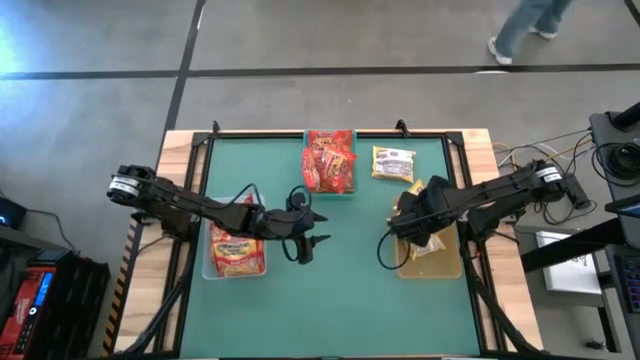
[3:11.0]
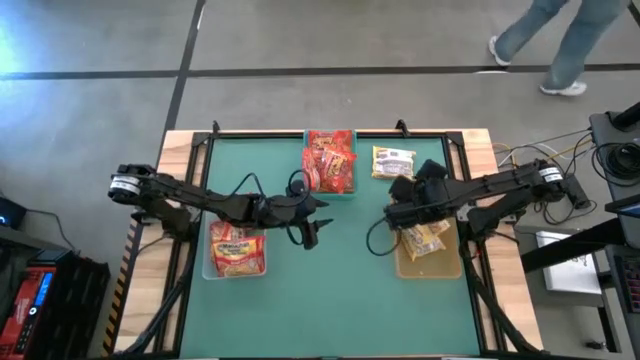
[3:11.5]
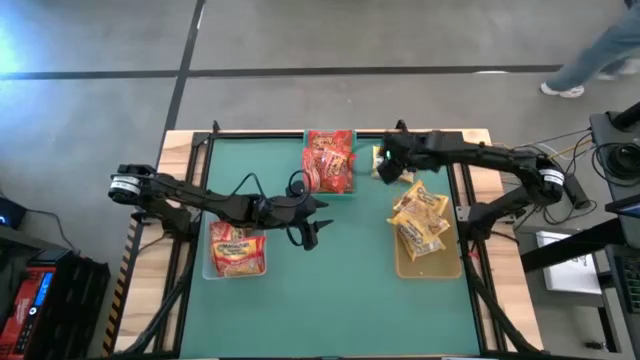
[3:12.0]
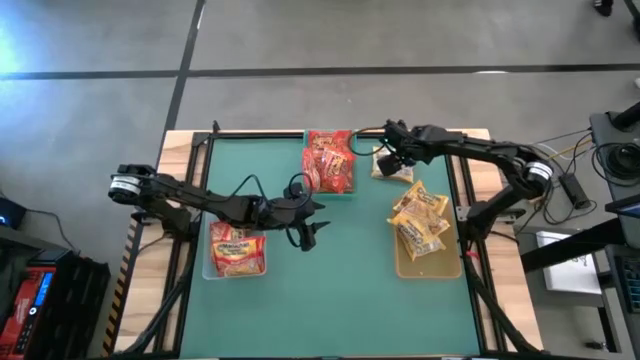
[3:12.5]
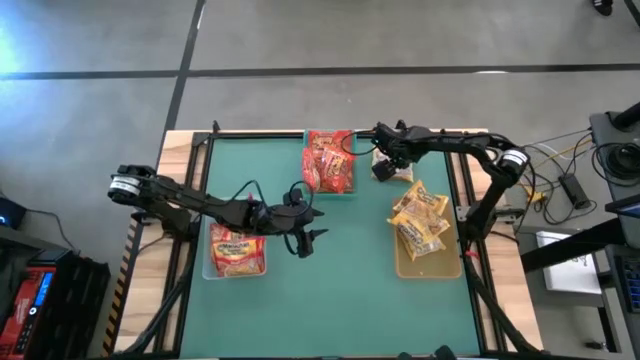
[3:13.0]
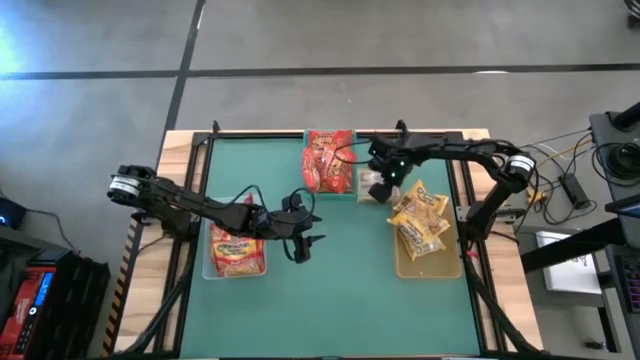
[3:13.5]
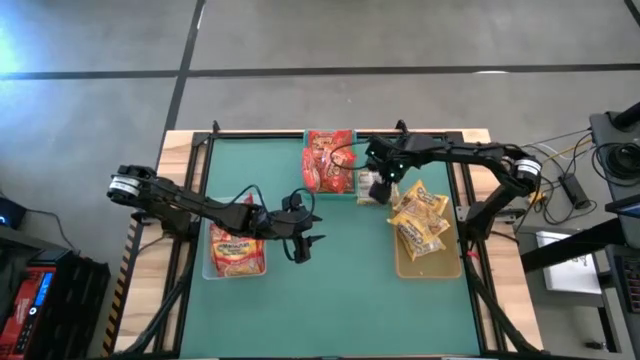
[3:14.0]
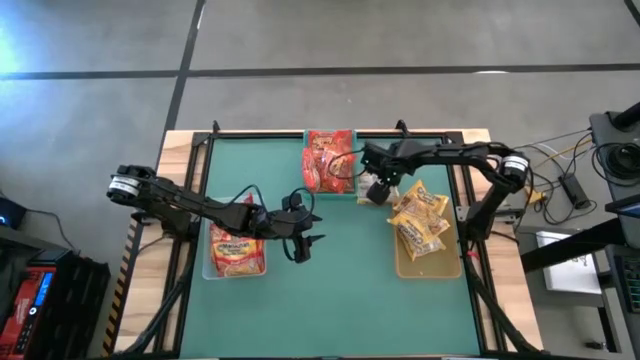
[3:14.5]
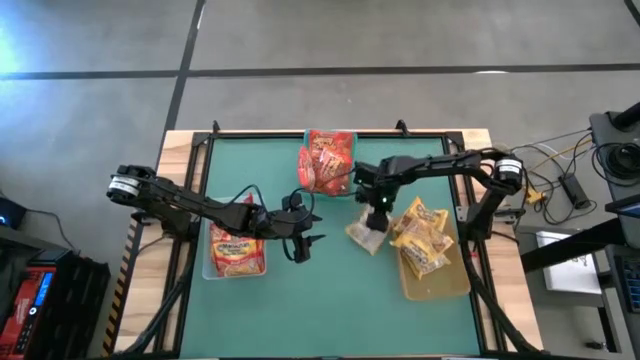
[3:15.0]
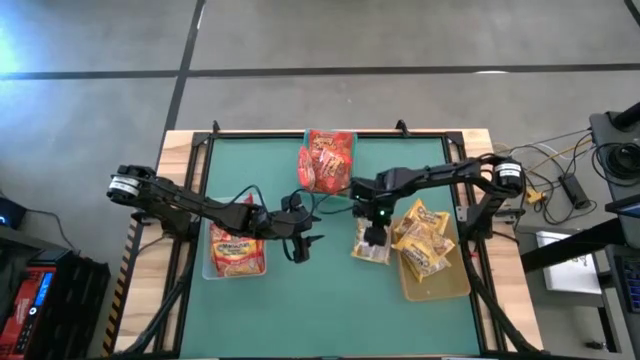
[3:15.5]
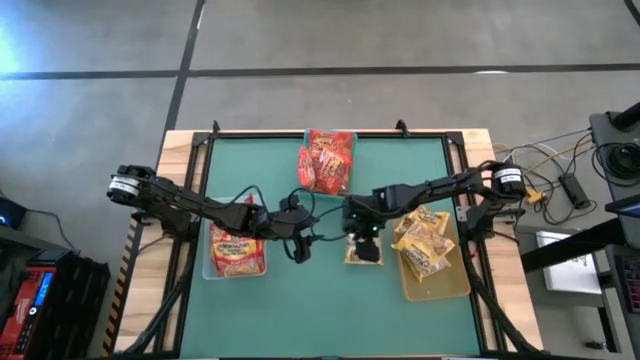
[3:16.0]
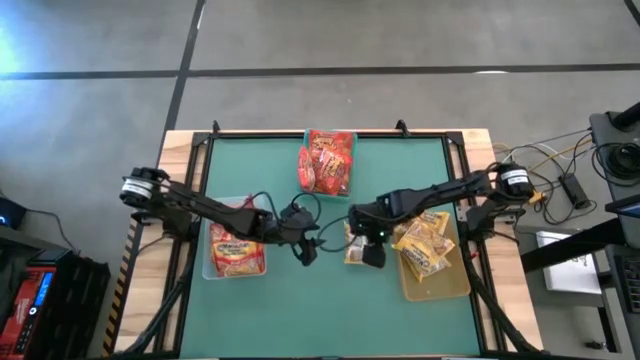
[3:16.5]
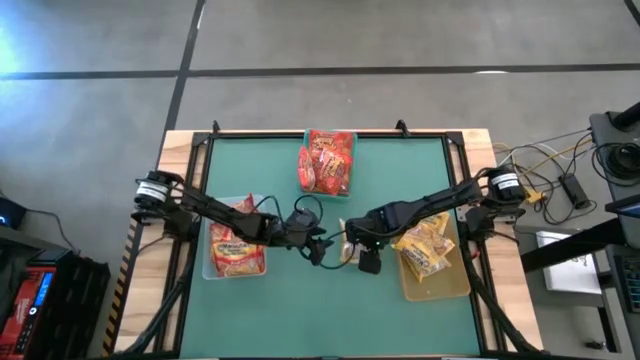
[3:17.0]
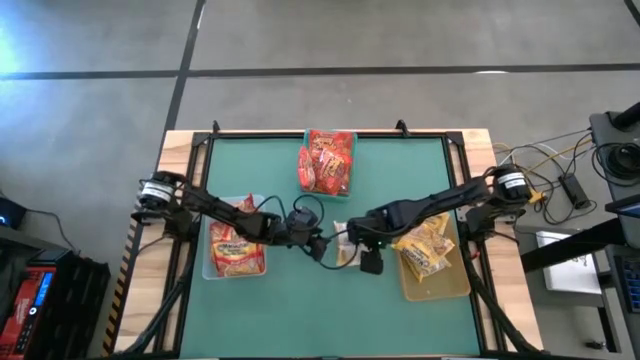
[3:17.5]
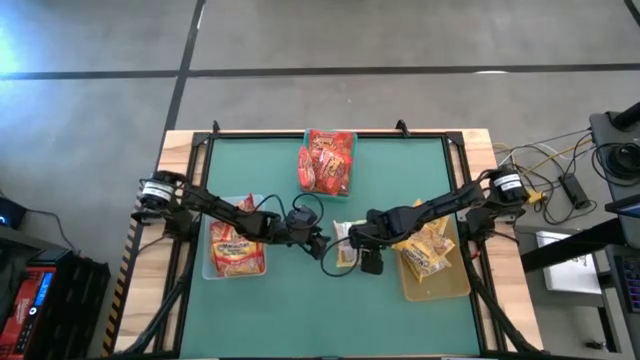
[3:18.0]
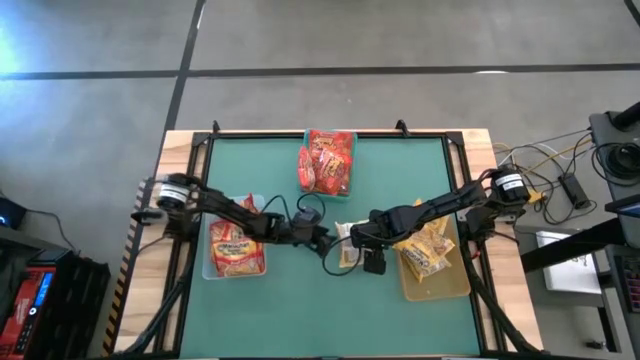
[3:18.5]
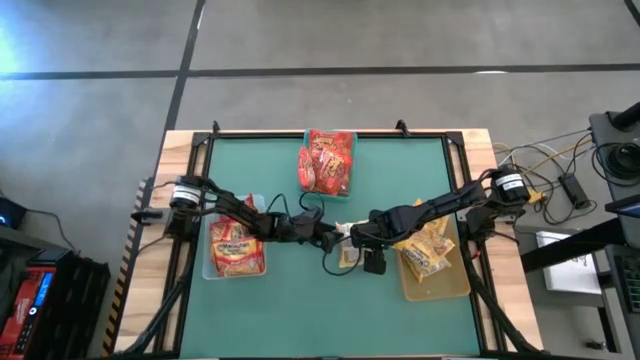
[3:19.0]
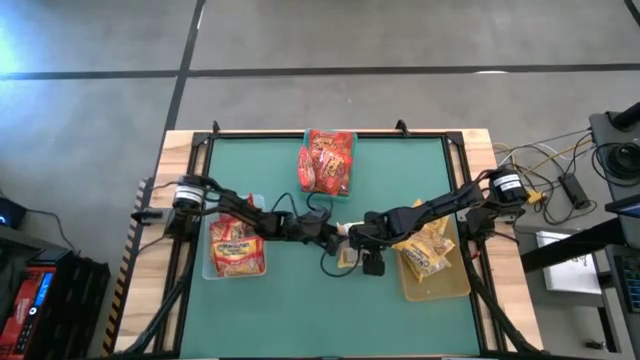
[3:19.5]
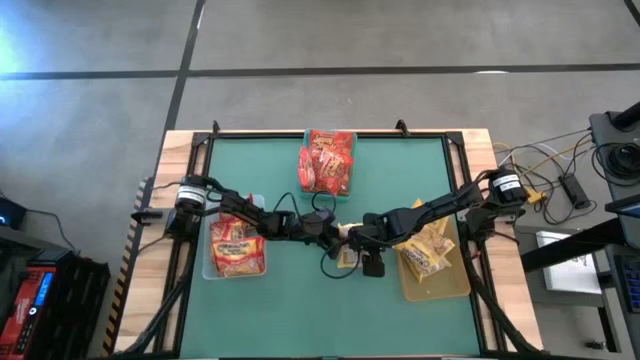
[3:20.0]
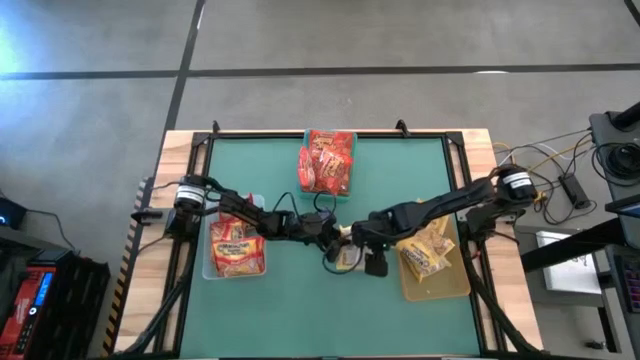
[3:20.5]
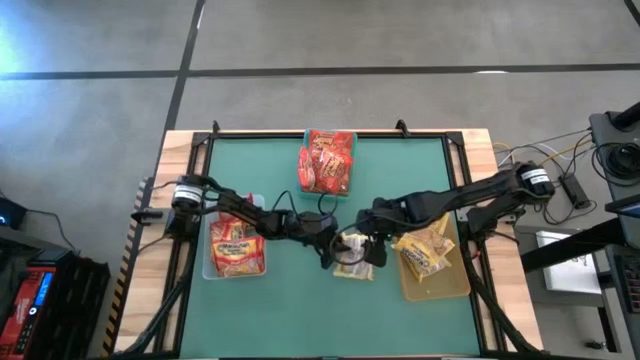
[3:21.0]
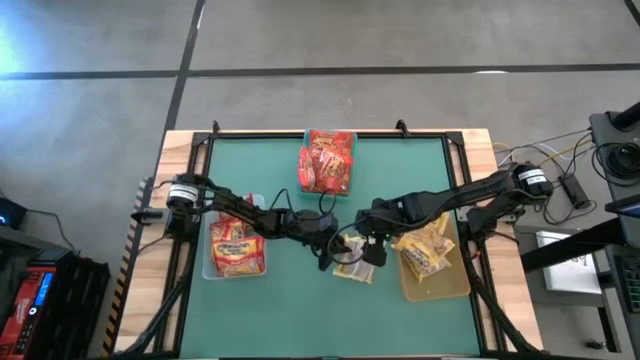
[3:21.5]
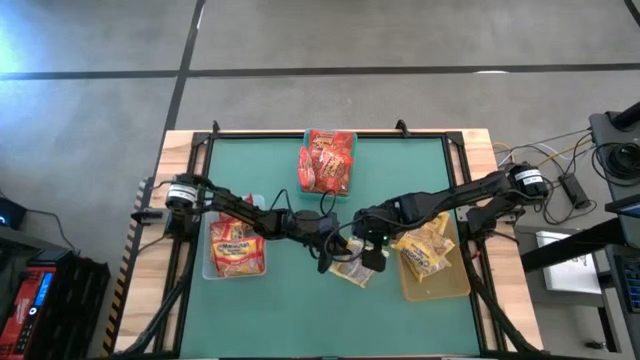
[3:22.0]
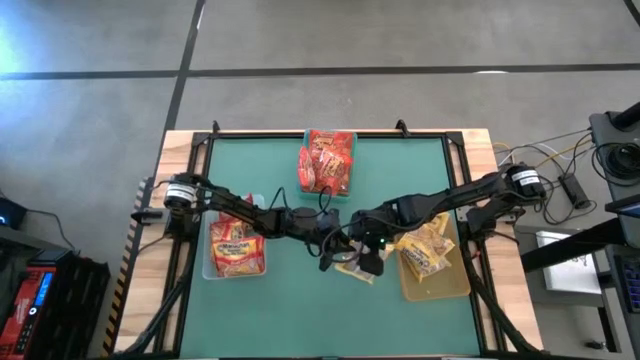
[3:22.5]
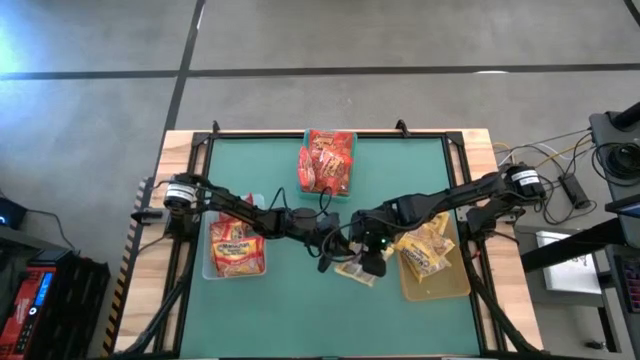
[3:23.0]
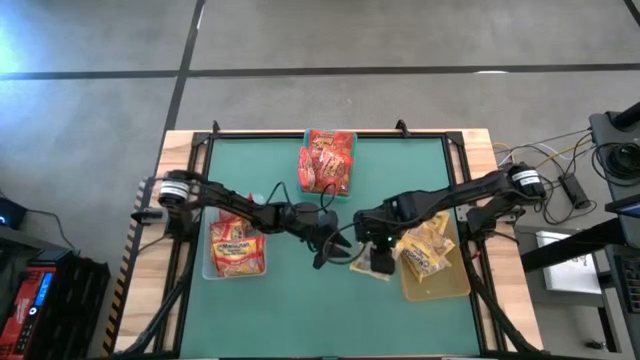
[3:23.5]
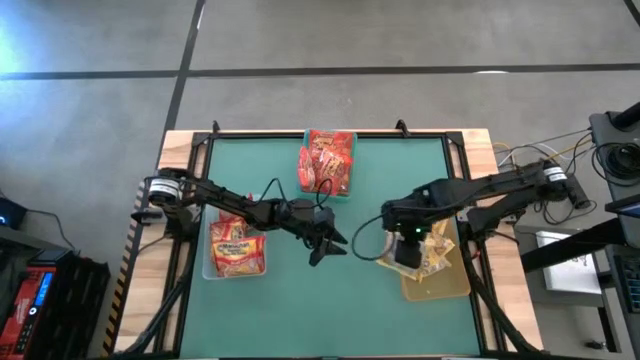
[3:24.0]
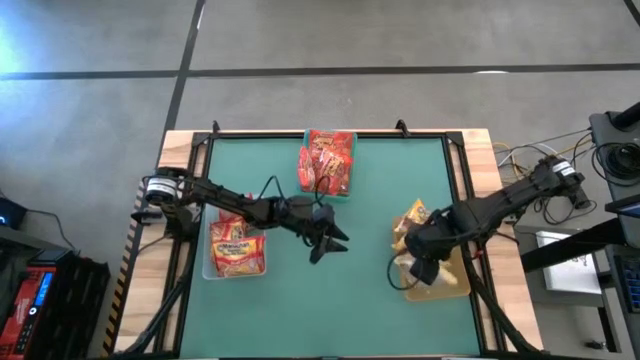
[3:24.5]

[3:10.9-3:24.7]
Task: Sort Maruchan noodles
Put the yellow noodle pack into the yellow bin

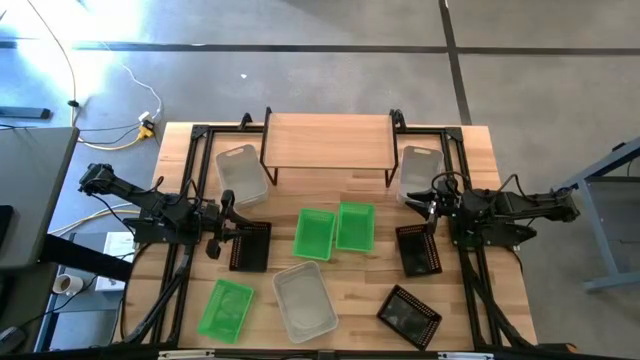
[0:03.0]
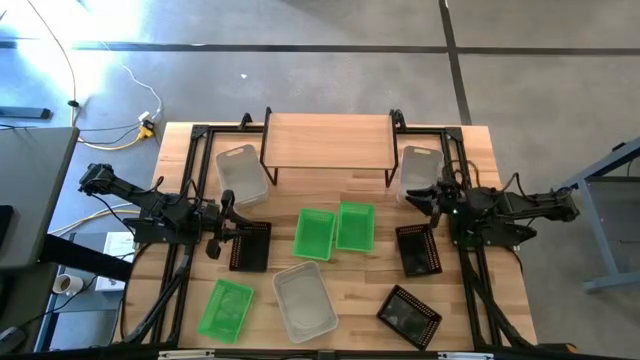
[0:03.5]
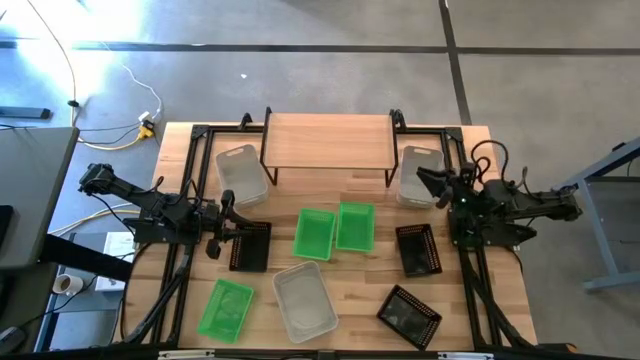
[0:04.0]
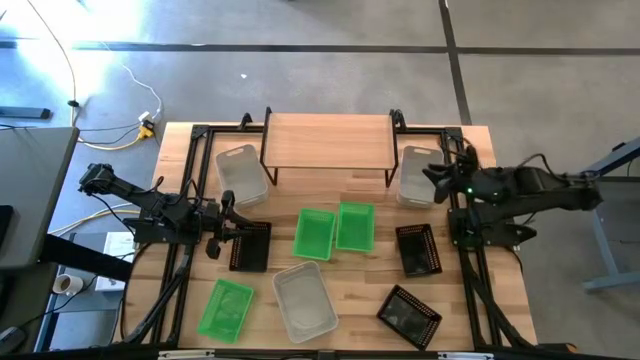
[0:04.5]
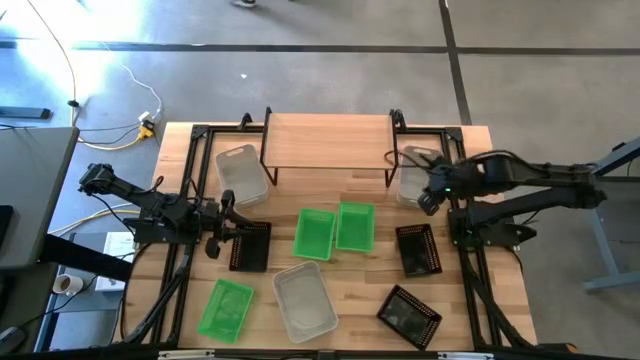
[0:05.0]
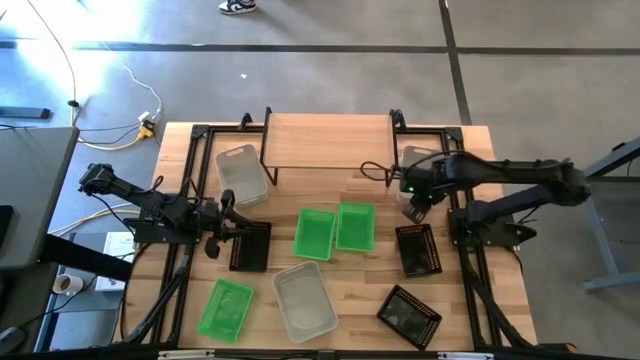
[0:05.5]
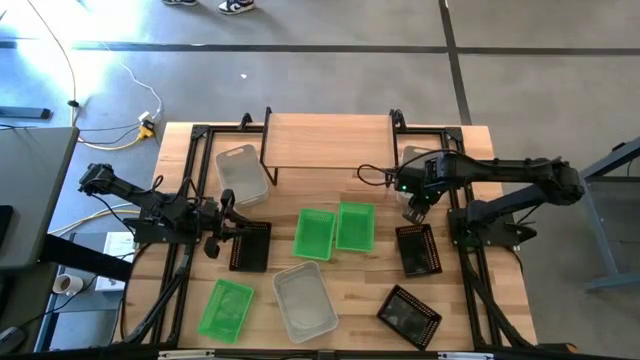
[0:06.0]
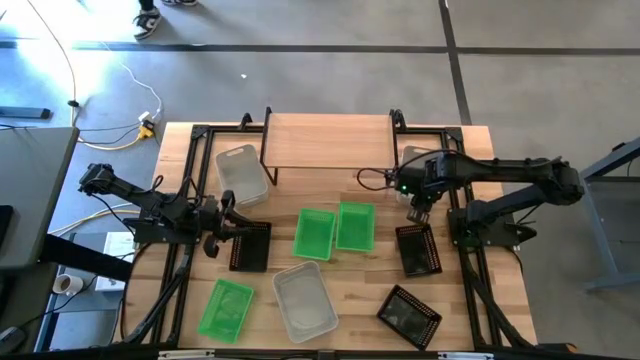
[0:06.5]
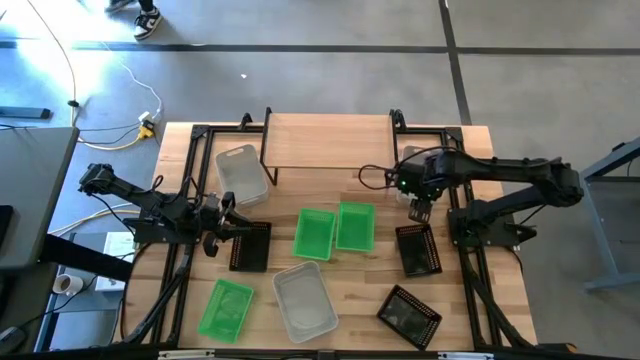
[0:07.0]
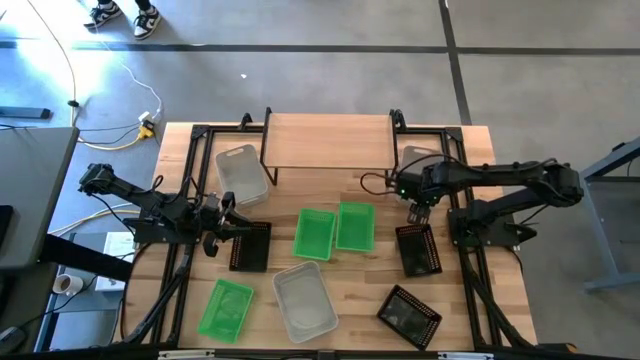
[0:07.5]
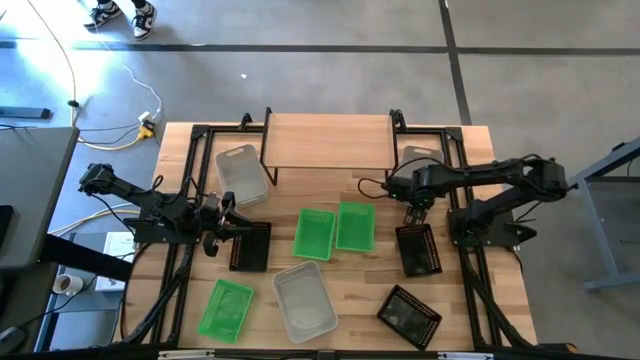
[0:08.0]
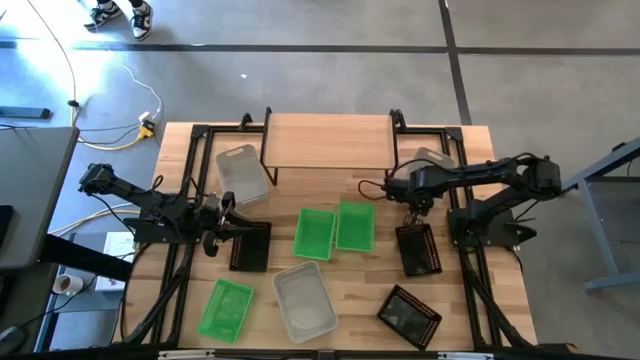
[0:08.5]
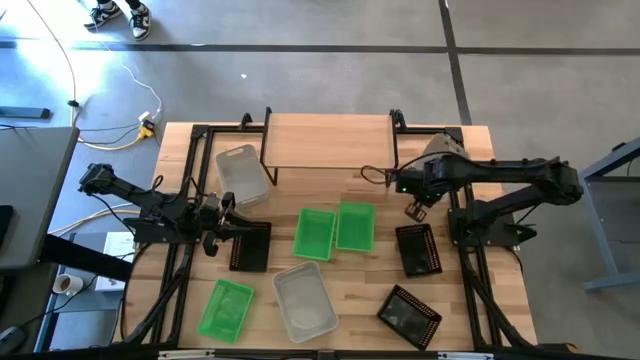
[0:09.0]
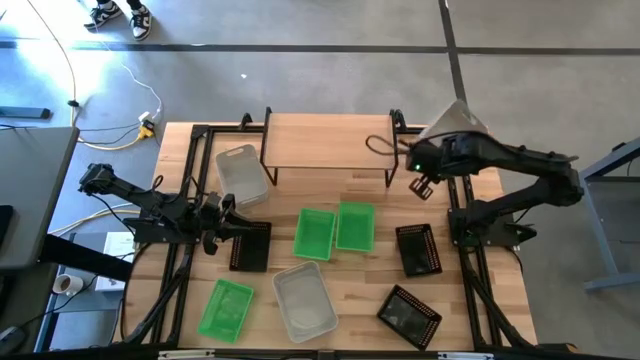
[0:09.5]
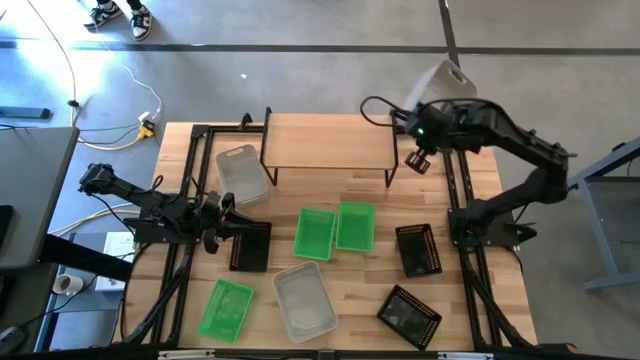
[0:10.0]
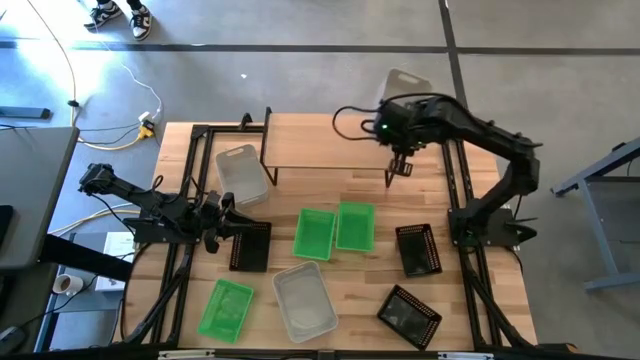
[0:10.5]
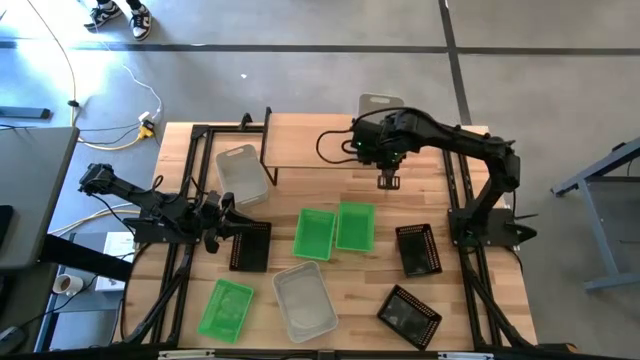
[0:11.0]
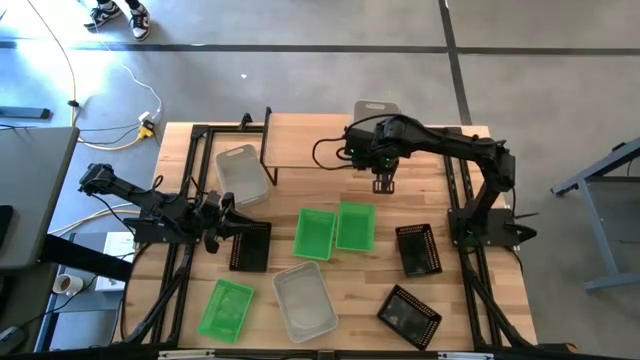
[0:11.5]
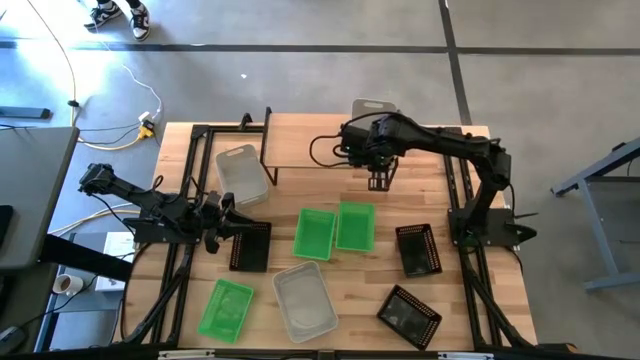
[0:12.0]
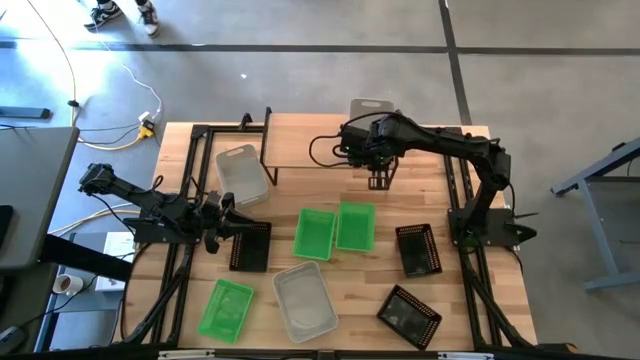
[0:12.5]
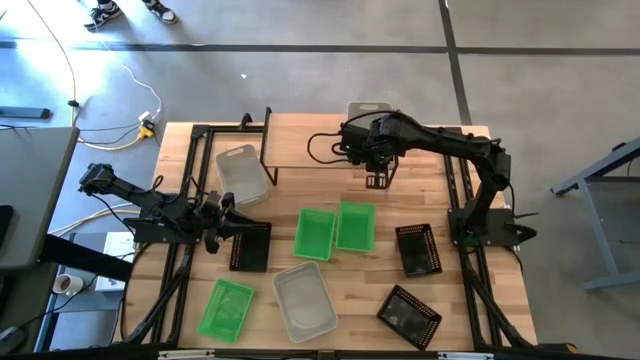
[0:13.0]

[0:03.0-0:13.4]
Task: Stack baskets on shelf by color
Put the top right gray bin on the shelf
